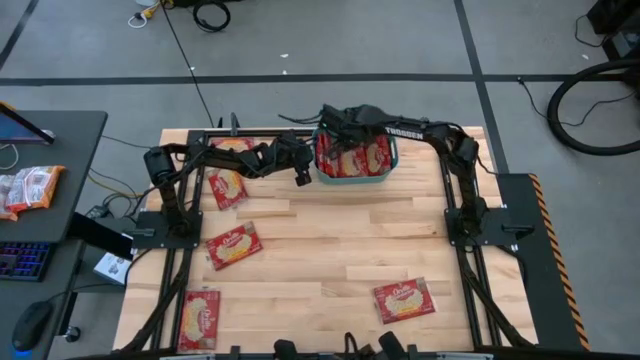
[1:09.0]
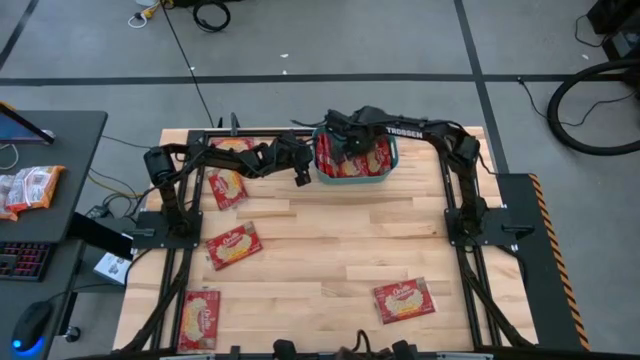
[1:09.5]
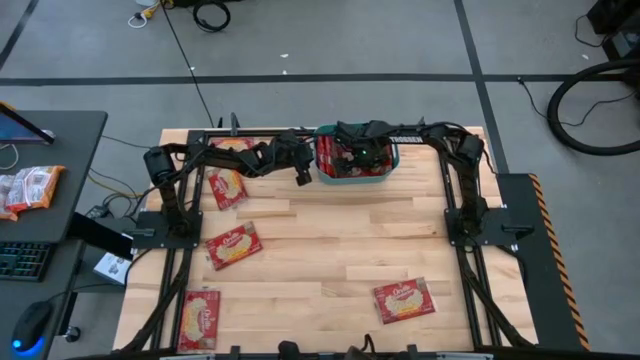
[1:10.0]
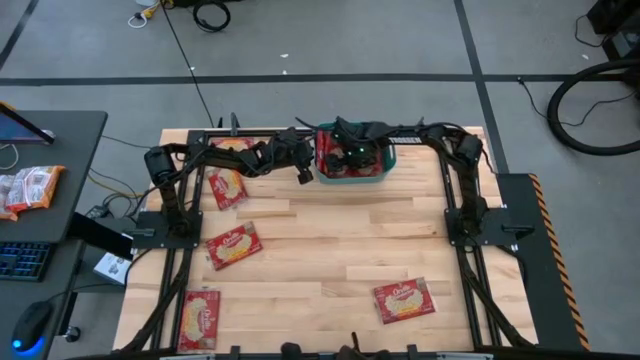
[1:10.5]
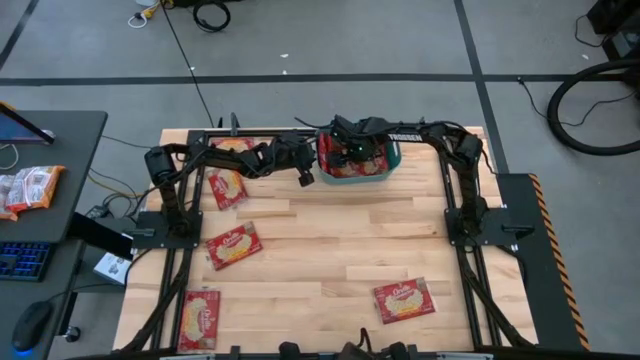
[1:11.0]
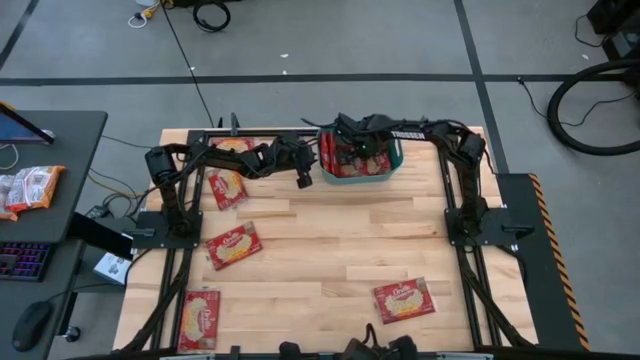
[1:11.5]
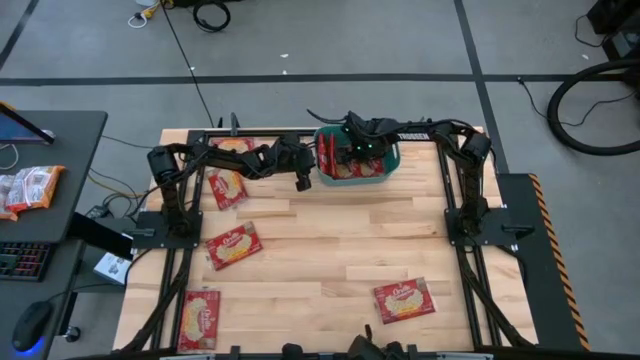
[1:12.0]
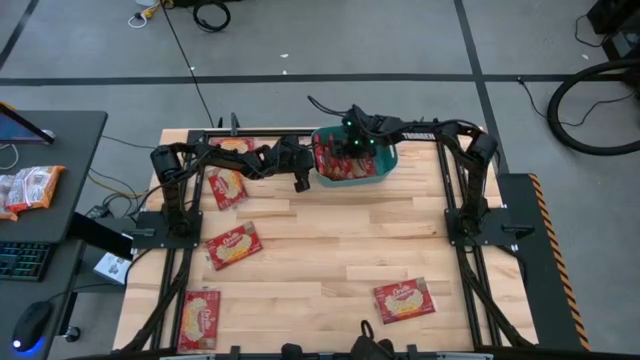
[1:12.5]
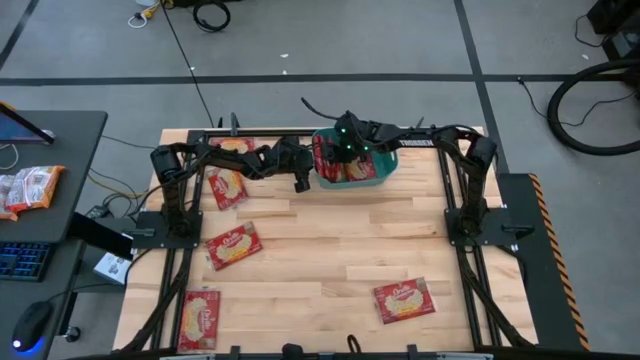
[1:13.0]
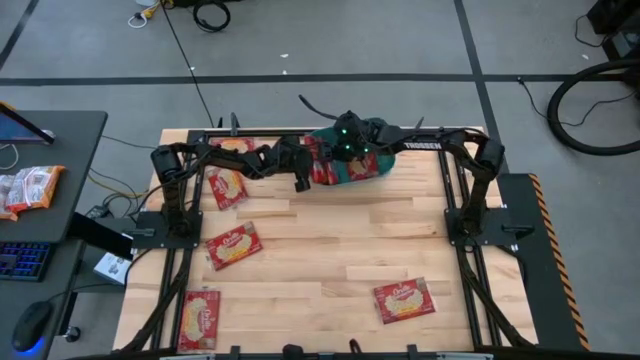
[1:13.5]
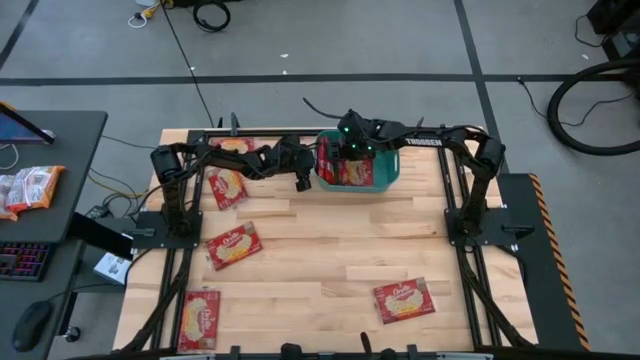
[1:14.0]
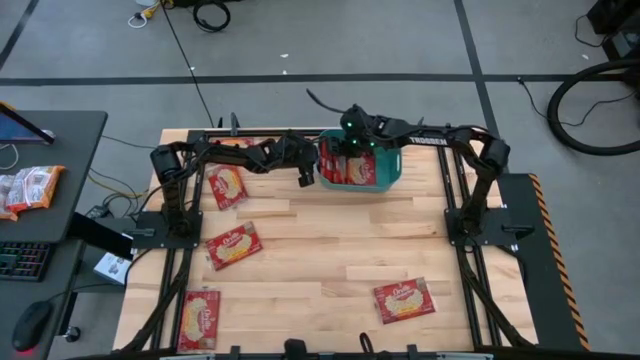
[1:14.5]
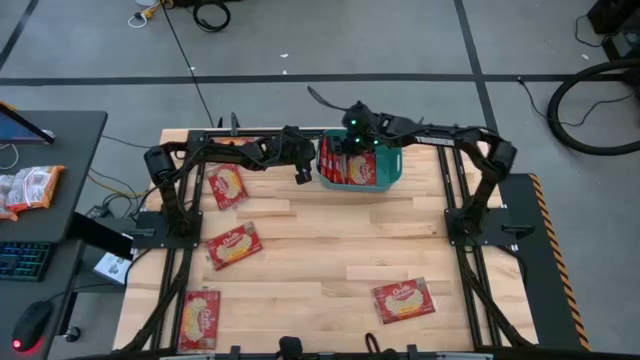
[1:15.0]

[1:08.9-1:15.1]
Task: Sort popcorn bags into baskets
Adjust the popcorn bag in the bin

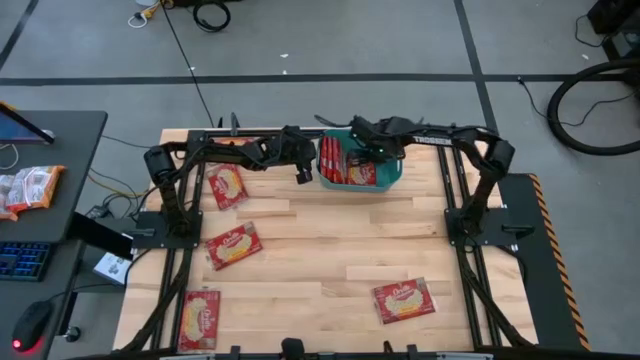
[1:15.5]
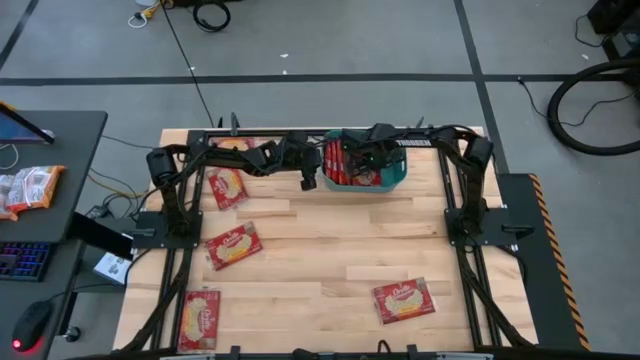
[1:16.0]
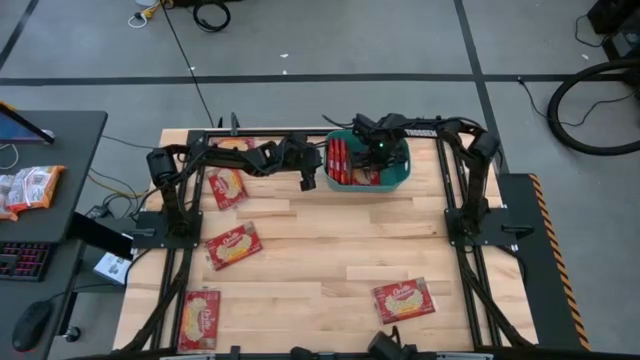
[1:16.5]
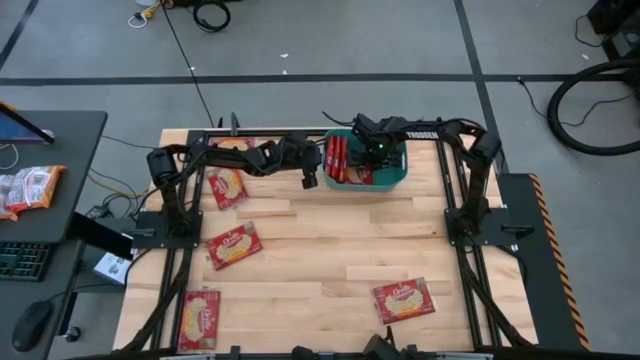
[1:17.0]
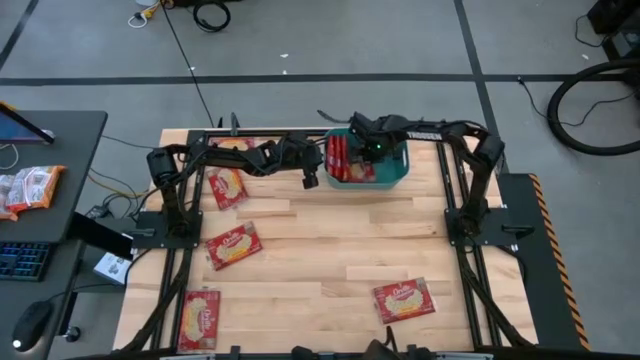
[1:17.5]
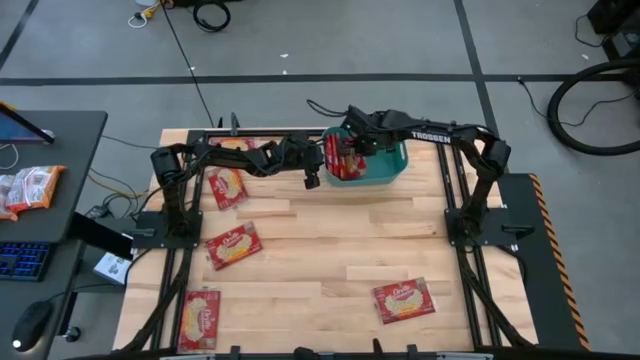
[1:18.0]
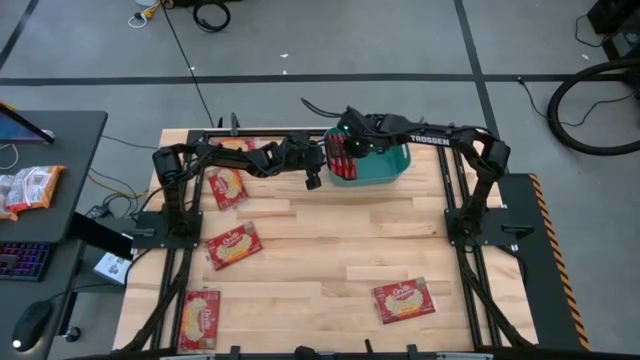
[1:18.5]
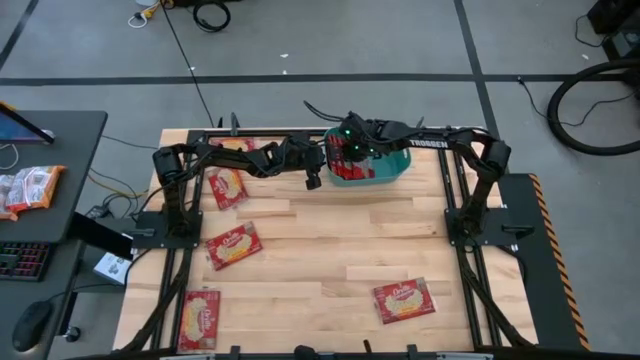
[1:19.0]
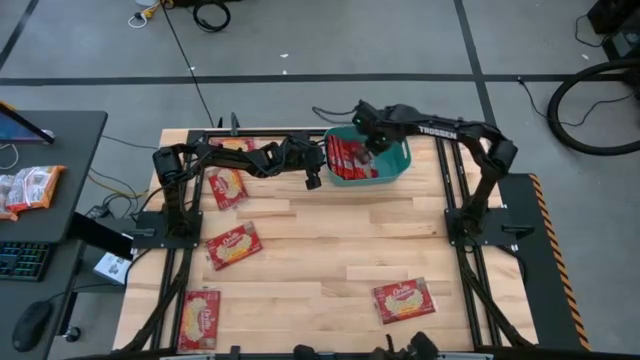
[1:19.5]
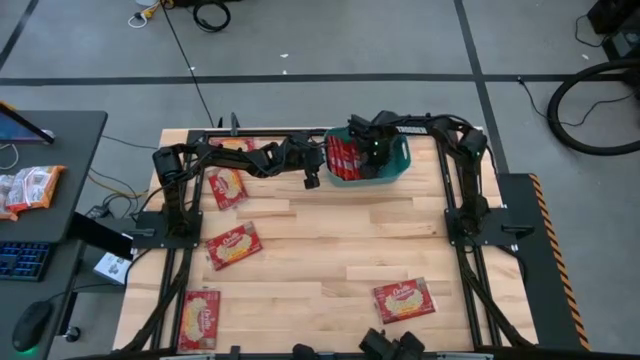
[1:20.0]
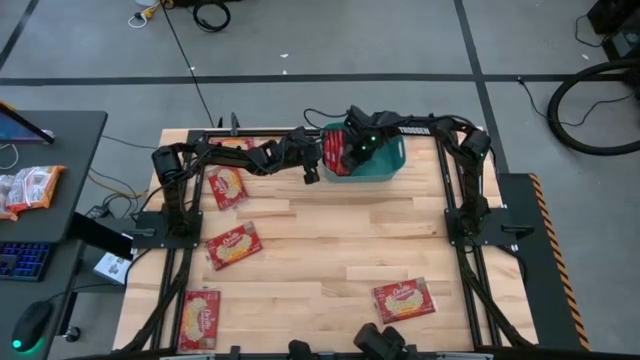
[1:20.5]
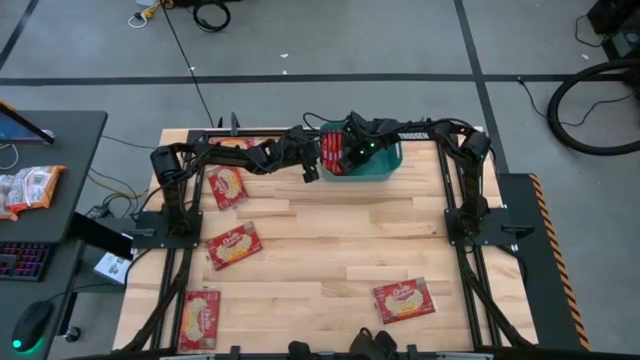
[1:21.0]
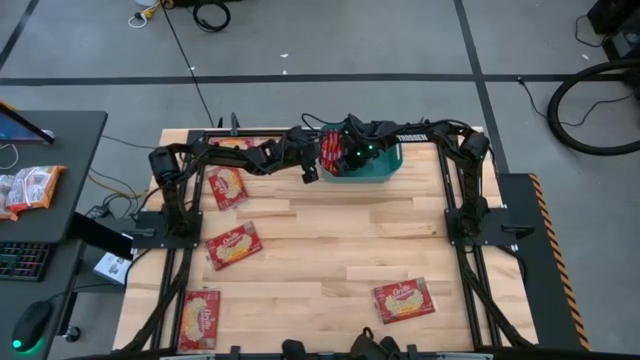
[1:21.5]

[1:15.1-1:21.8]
Adjust the popcorn bag in the bin
